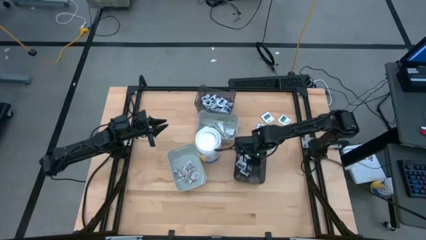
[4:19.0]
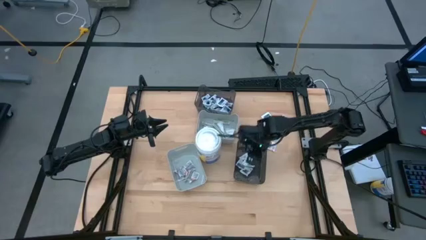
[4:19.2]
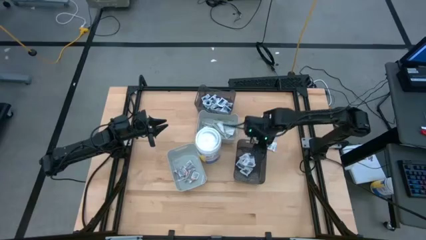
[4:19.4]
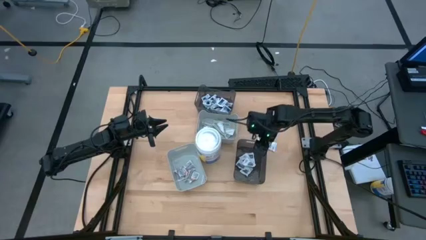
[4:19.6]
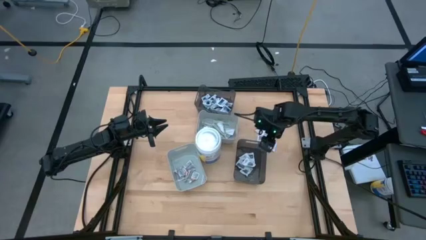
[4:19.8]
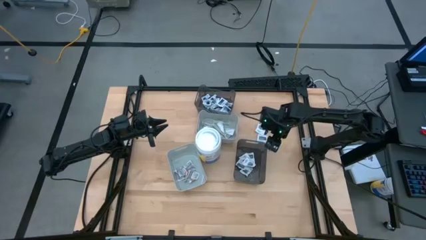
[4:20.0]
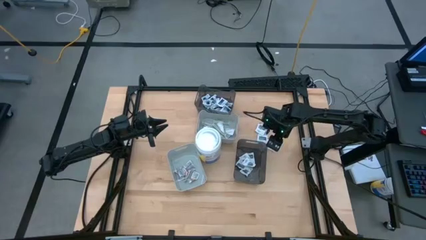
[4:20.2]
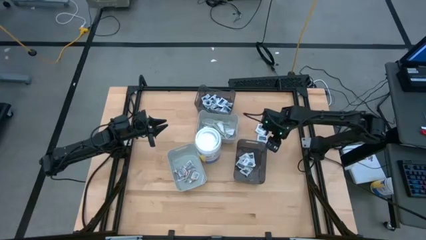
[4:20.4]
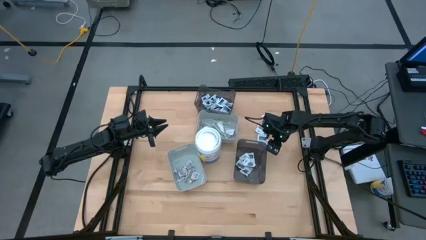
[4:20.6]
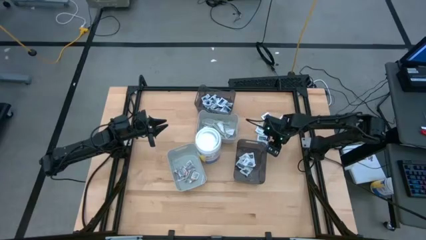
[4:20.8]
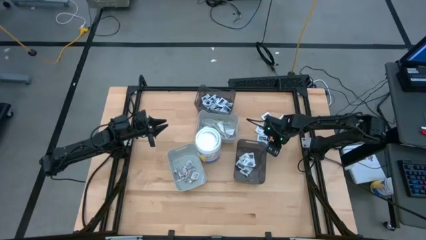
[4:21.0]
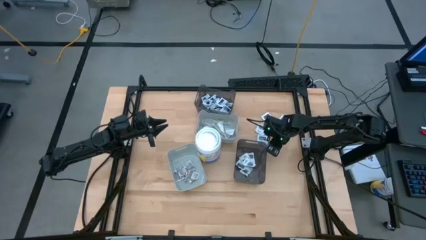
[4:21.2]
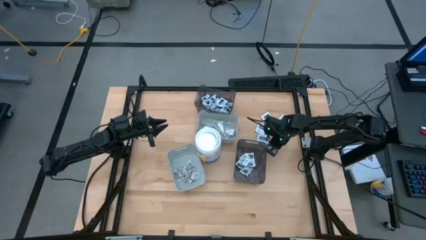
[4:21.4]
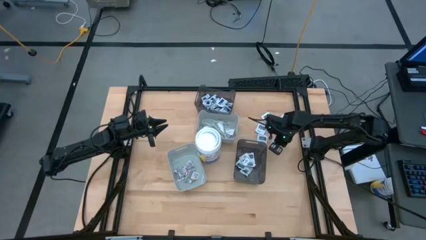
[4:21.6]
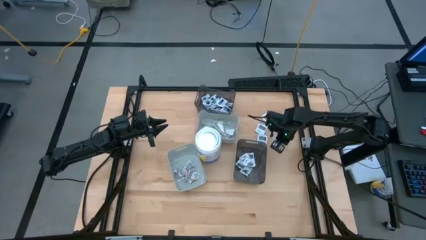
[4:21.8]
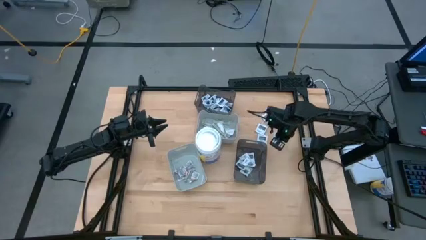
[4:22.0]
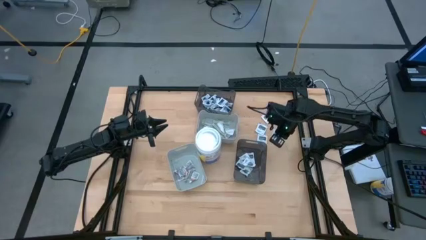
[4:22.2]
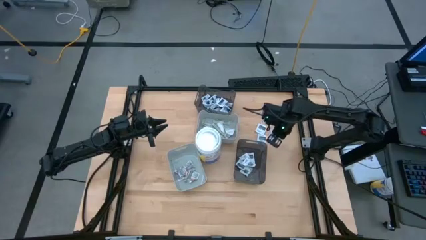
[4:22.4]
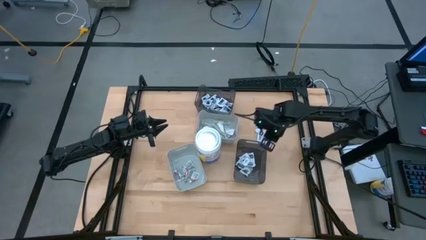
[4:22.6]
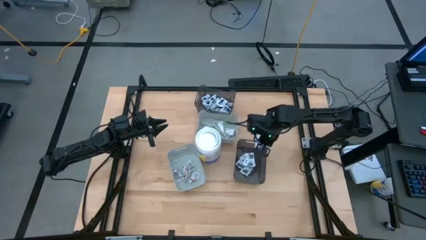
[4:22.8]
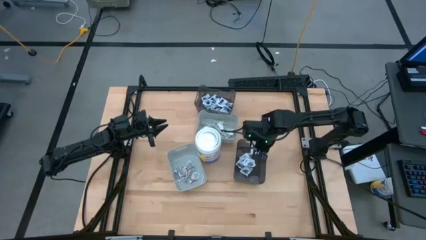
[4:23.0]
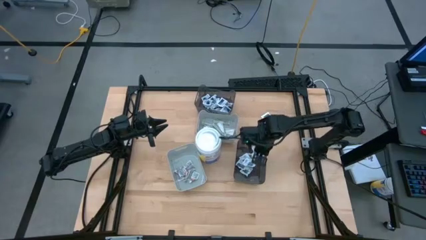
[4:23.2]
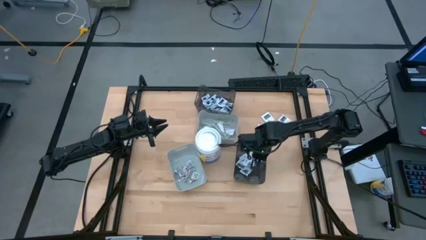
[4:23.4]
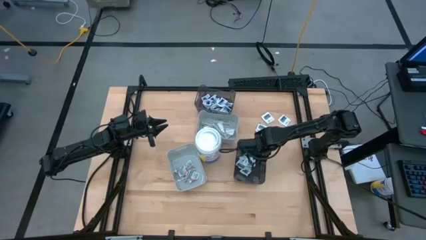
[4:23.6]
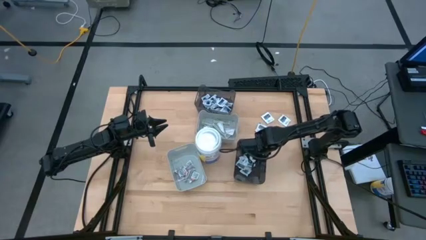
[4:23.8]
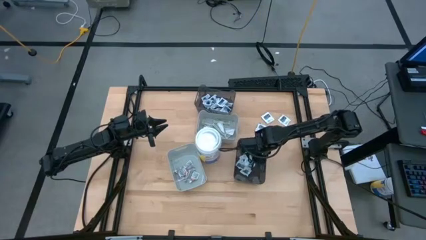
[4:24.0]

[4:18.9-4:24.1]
Task: Pick & Place First Aid Supplies
Put the towelette pack into the bottom transparent black bin

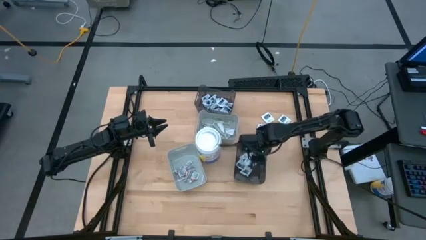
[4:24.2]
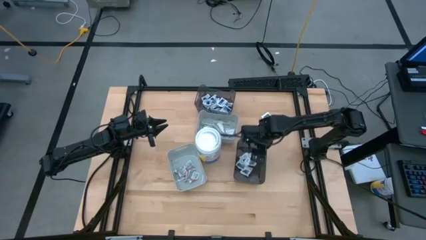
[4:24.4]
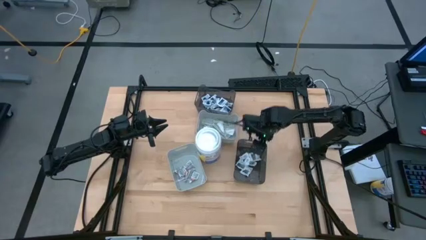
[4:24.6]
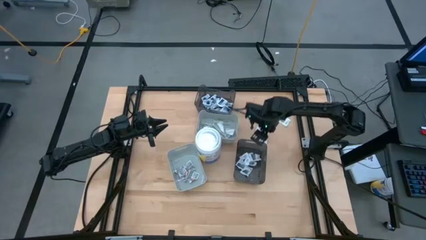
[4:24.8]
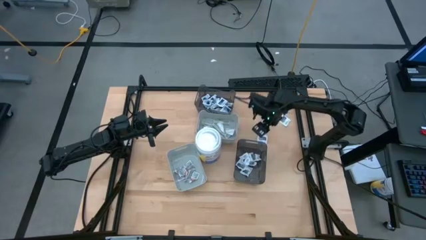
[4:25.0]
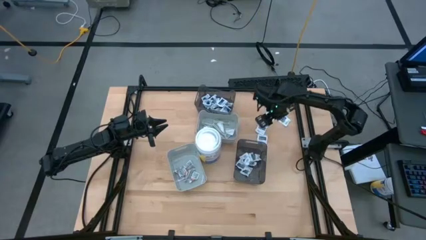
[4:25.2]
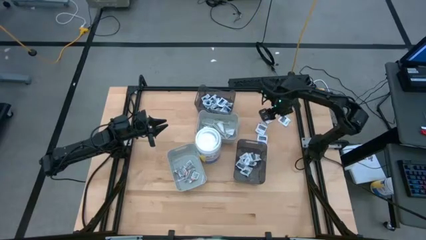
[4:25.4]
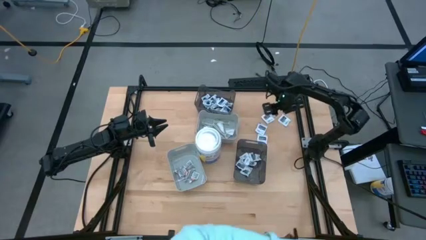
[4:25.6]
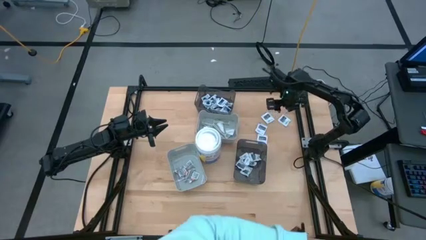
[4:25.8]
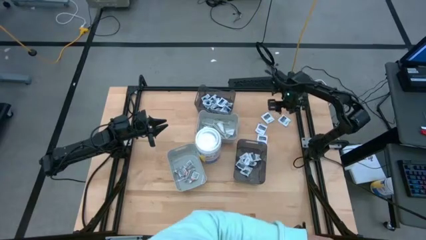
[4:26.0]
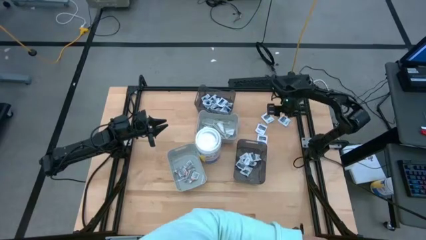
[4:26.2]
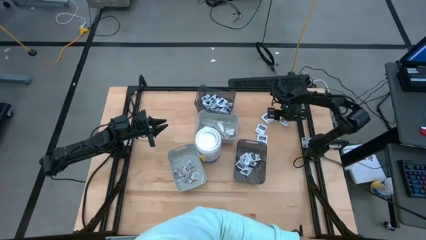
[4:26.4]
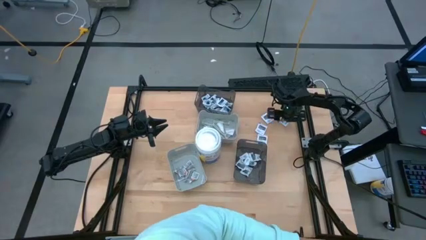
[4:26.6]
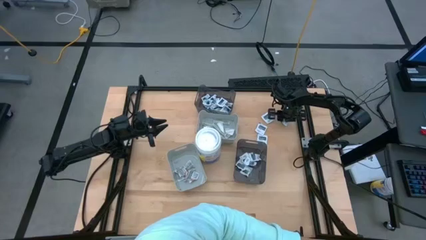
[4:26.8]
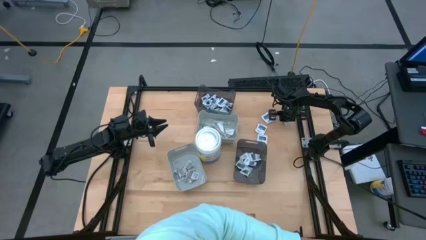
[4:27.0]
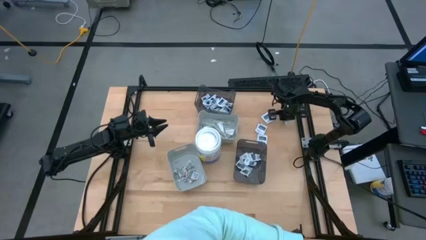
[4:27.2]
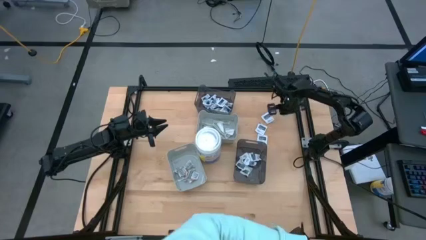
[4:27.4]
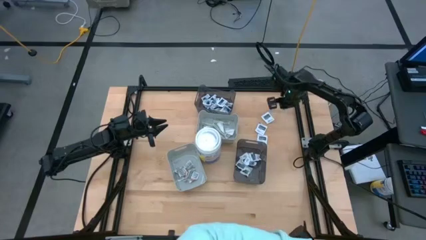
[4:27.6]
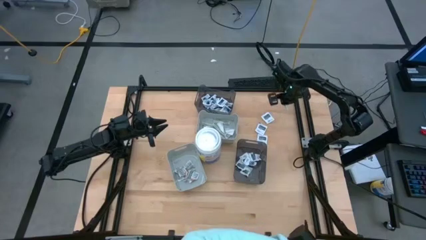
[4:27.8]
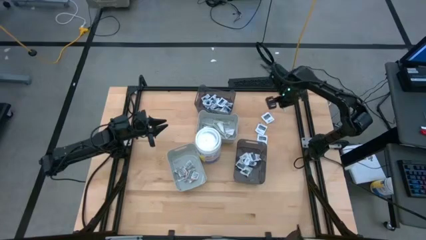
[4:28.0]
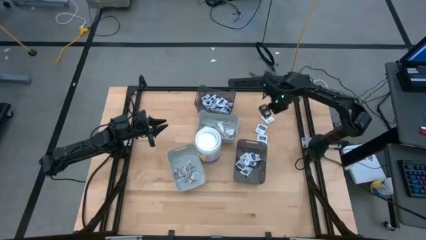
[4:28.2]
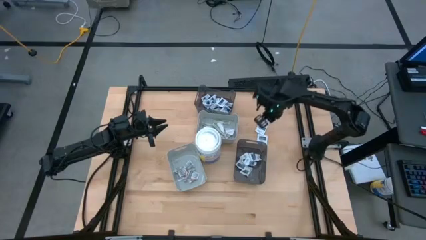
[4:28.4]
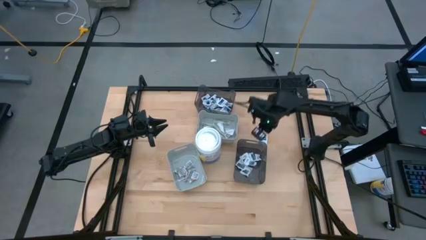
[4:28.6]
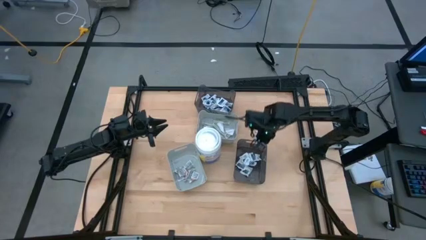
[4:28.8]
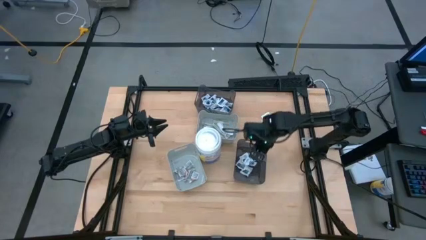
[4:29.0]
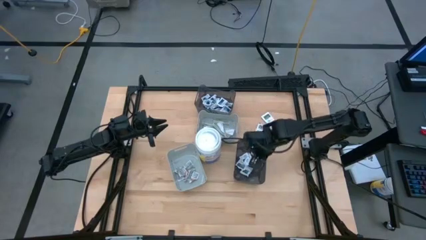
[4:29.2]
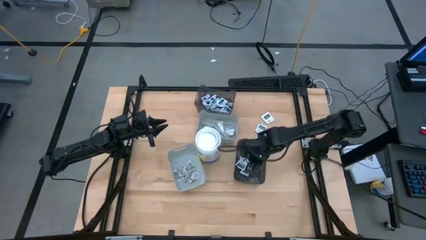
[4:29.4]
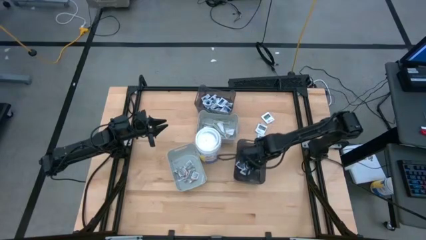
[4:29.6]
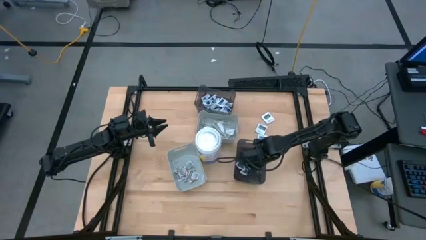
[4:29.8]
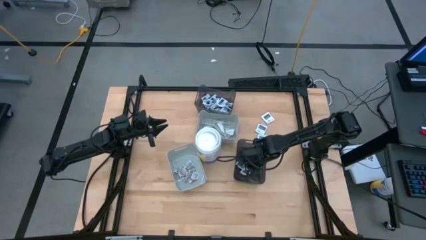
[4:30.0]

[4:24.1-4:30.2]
Put the towelette pack into the bottom transparent black bin

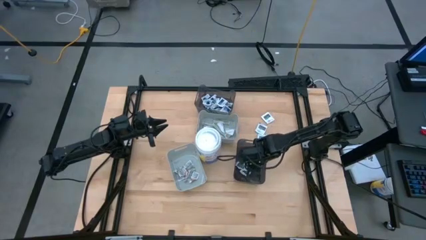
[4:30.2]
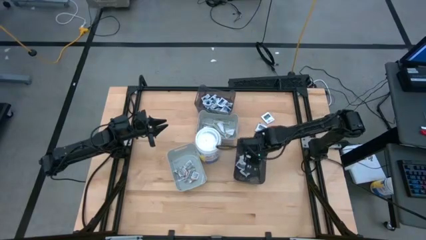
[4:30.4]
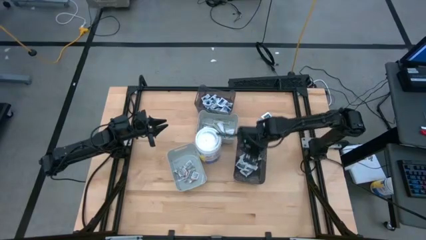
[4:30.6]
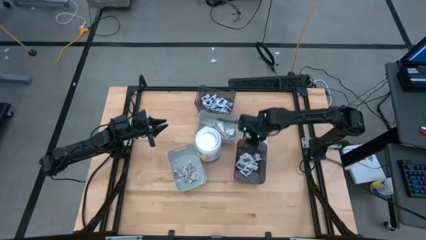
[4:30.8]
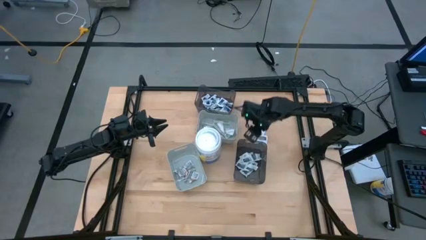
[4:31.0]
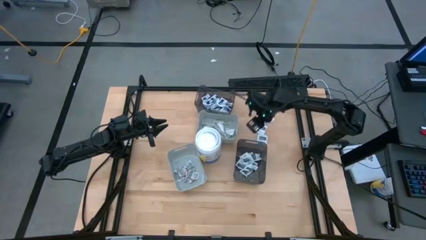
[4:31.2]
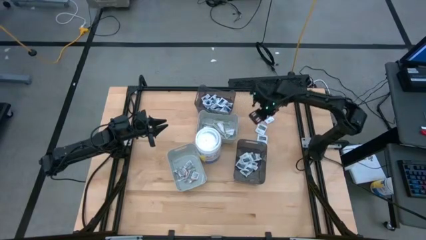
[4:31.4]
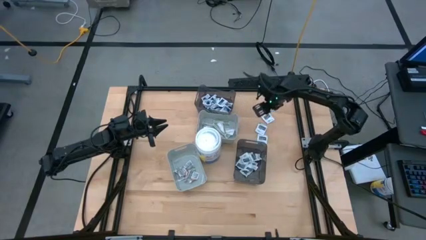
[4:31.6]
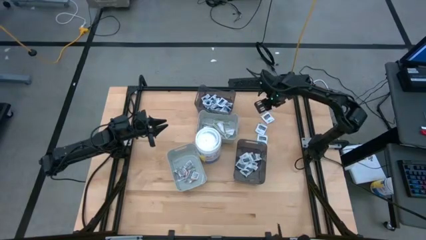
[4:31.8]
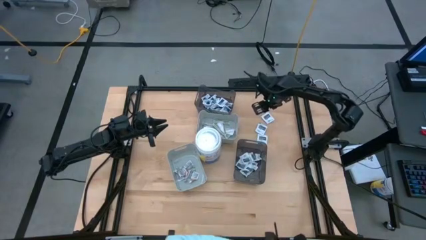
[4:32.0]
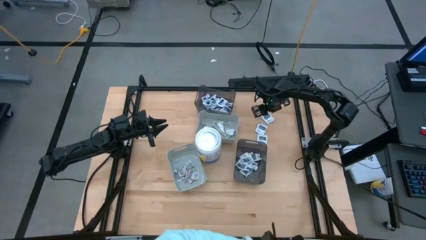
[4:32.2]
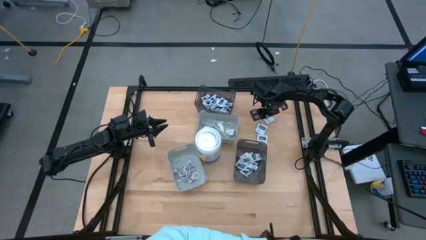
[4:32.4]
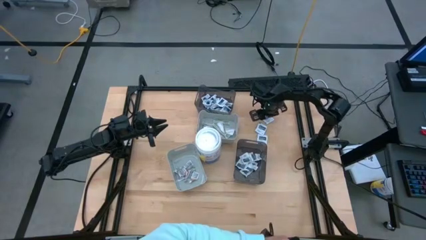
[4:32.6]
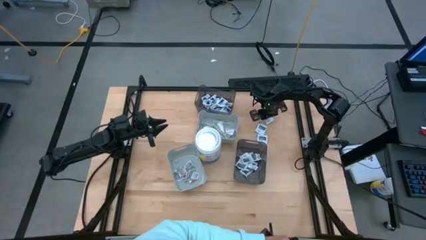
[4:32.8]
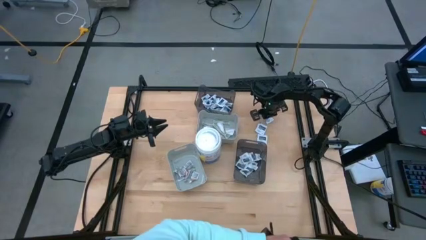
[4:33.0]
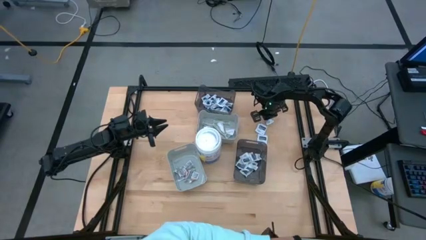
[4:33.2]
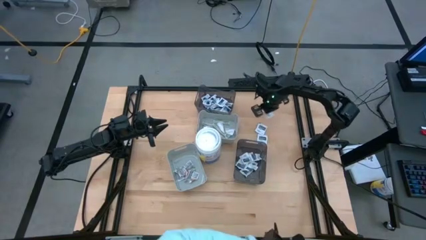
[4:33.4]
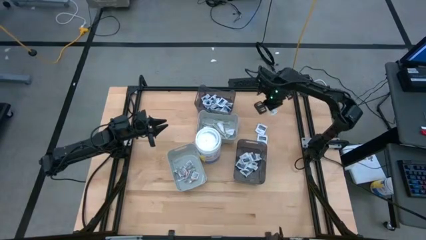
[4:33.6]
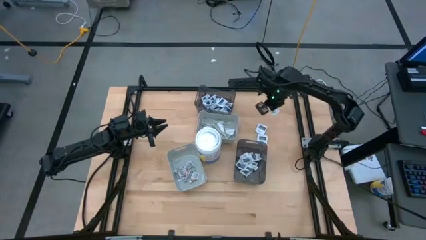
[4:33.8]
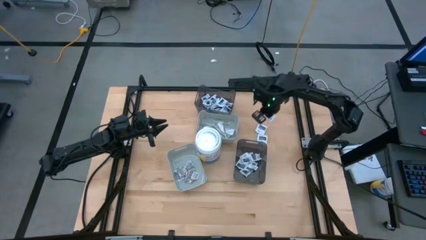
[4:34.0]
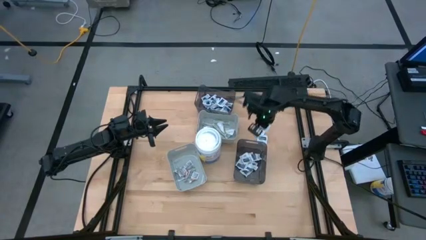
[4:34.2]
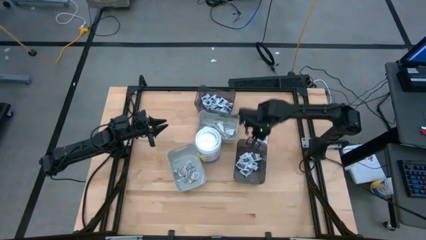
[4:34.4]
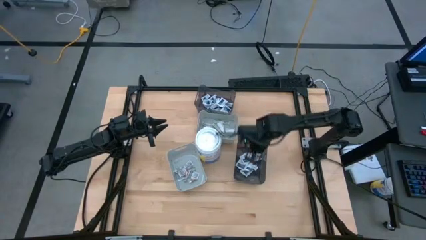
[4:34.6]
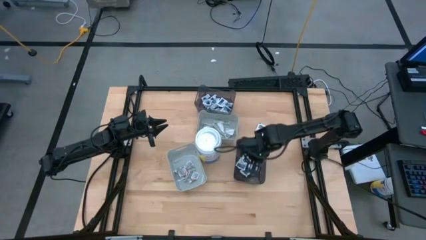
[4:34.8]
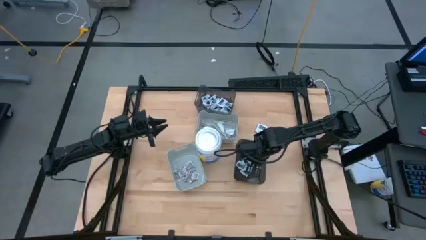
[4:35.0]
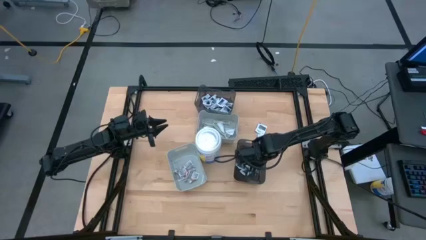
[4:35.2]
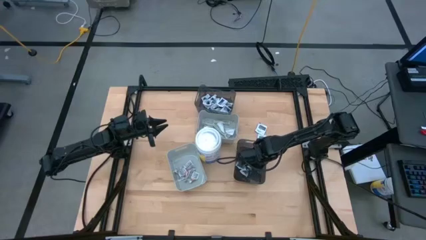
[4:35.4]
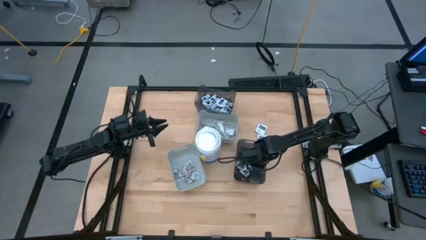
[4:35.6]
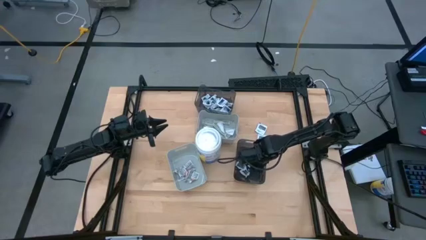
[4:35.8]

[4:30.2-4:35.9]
Put the towelette pack into the bottom transparent black bin
